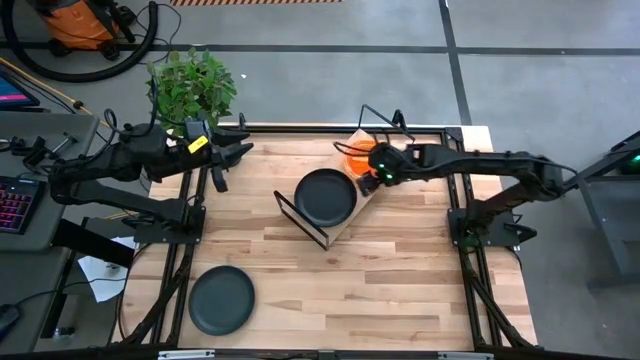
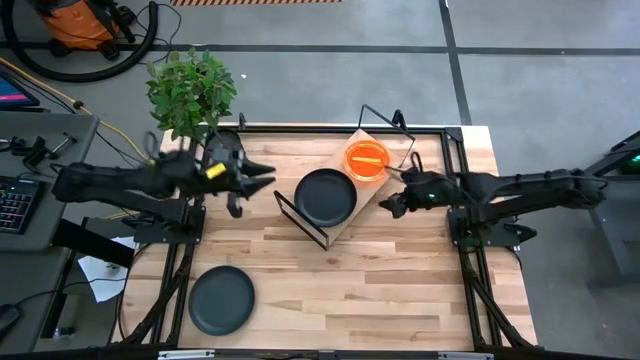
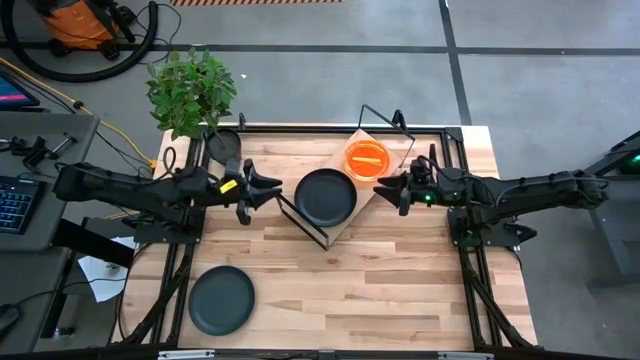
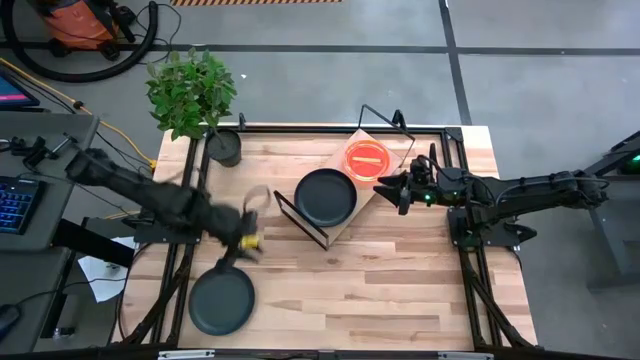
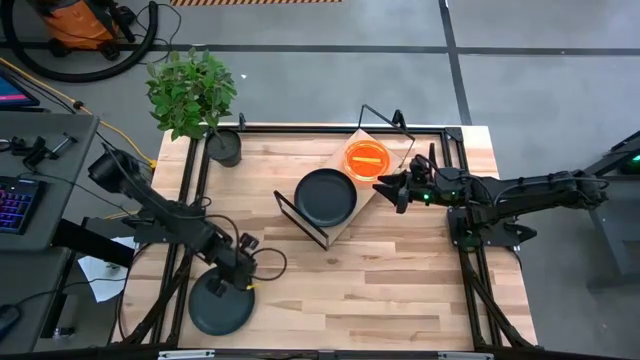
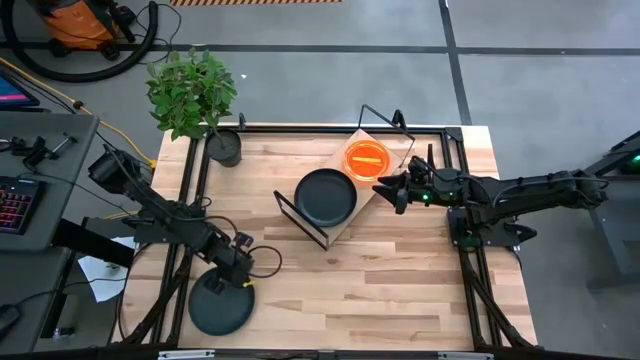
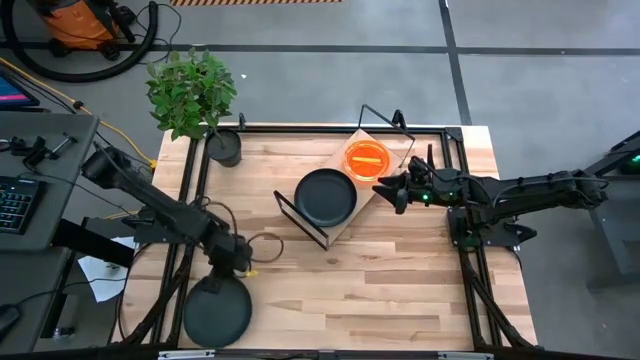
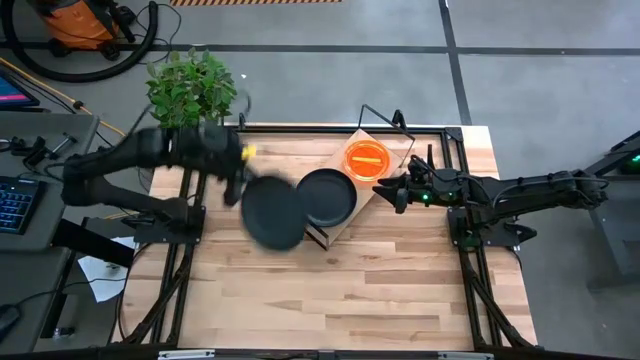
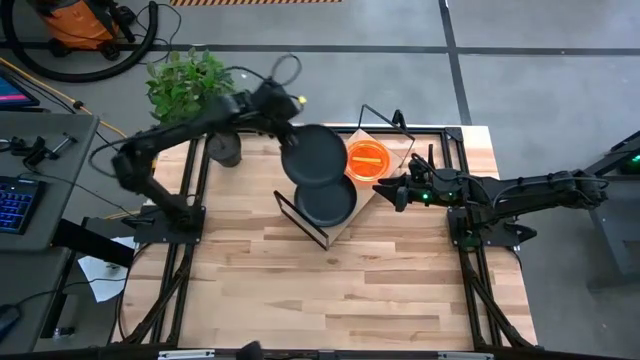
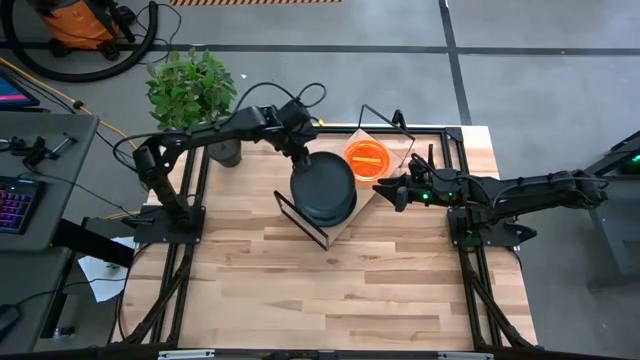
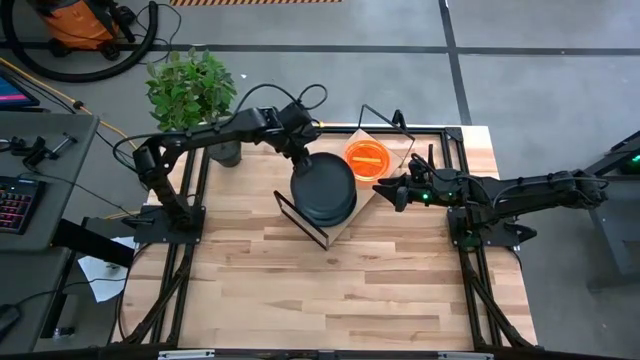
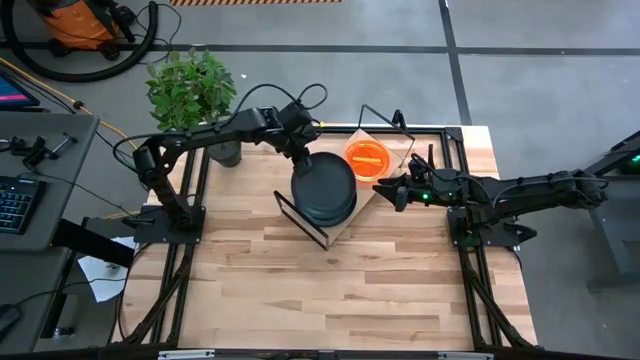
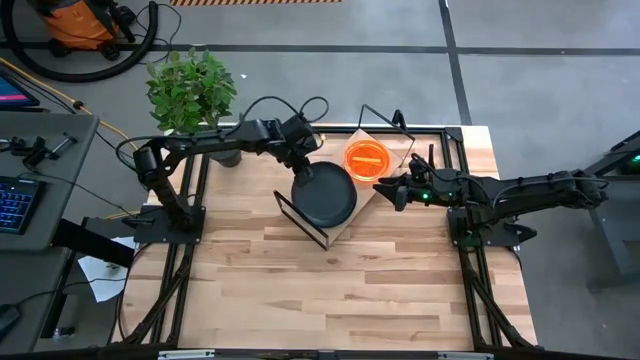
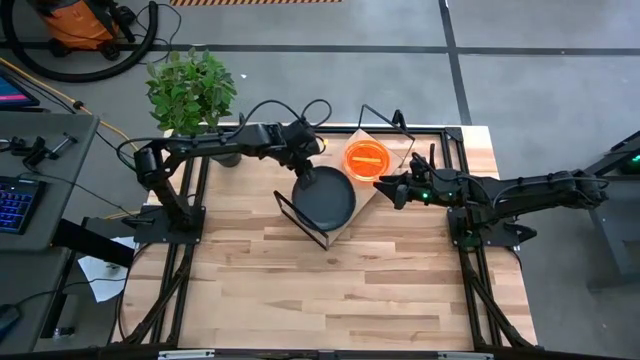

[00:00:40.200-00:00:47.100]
Task: Place and stack plates onto a shelf
Stack the black plate on top of the stacked black plates on the shelf

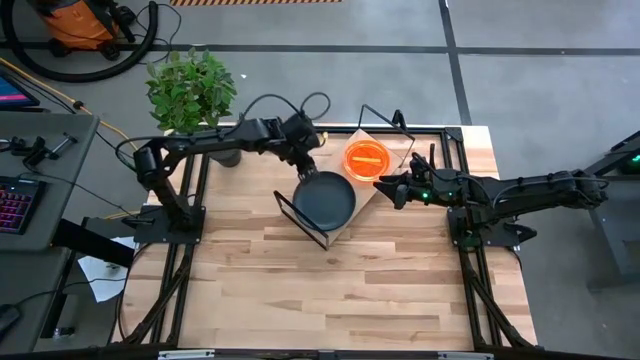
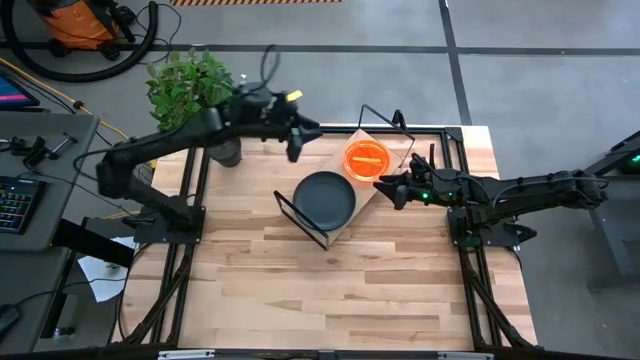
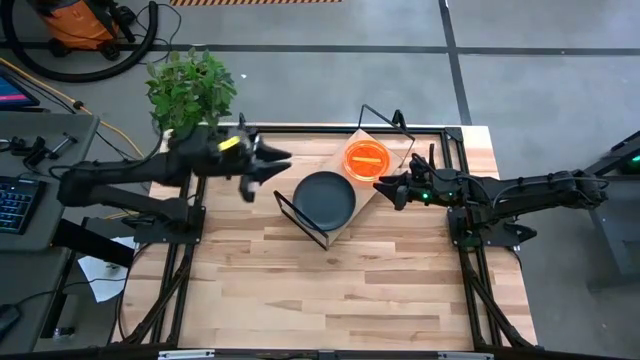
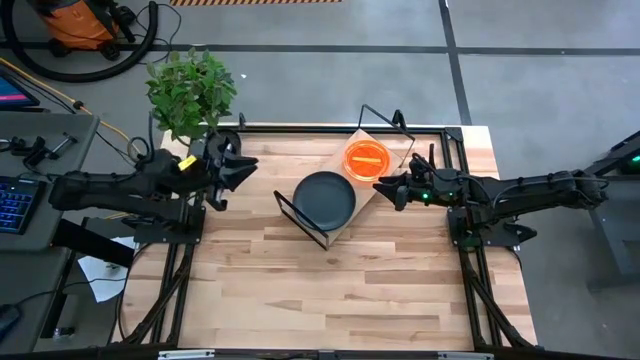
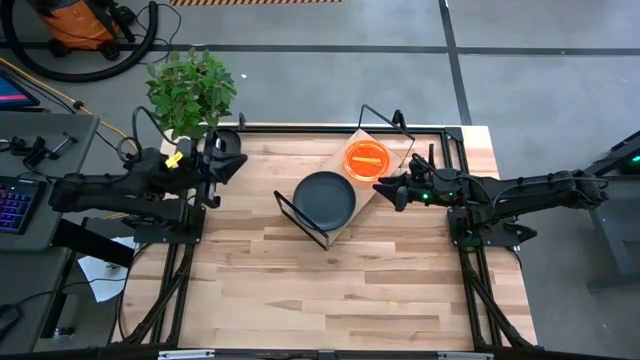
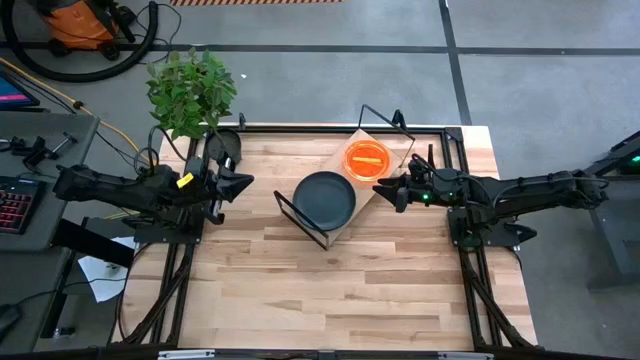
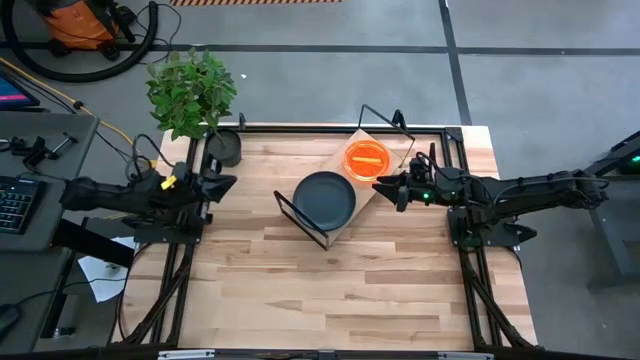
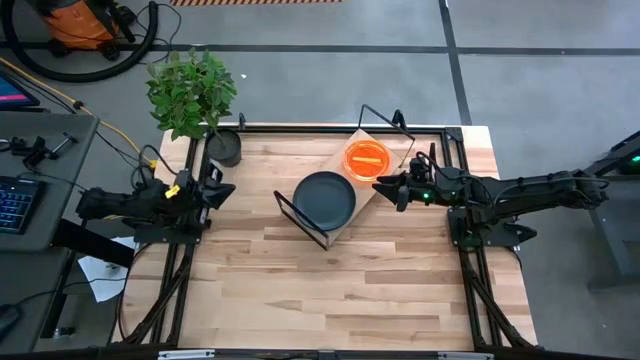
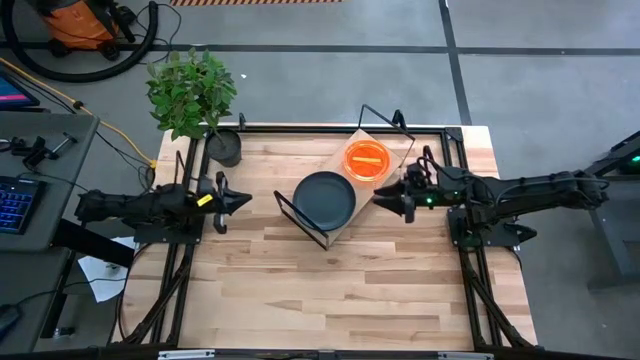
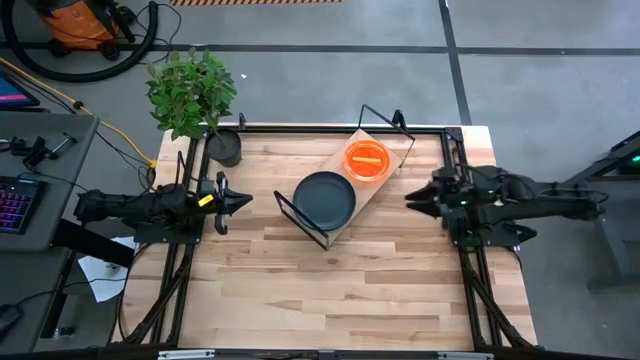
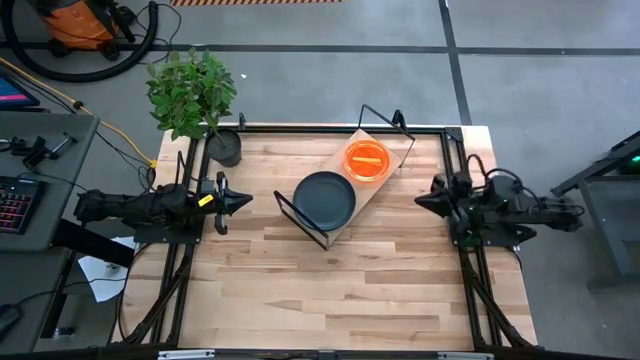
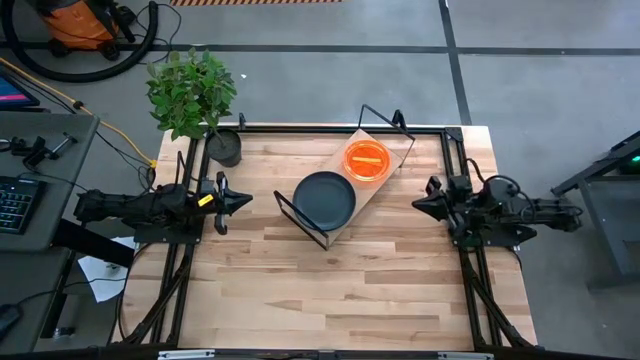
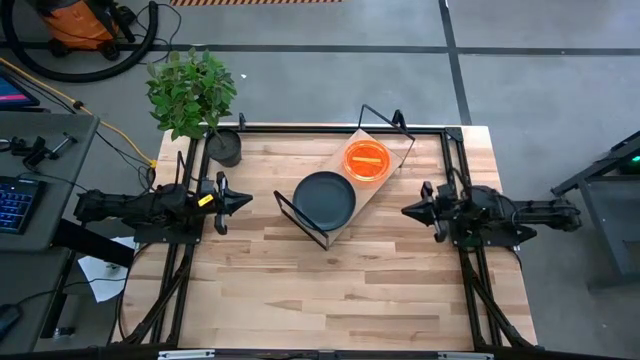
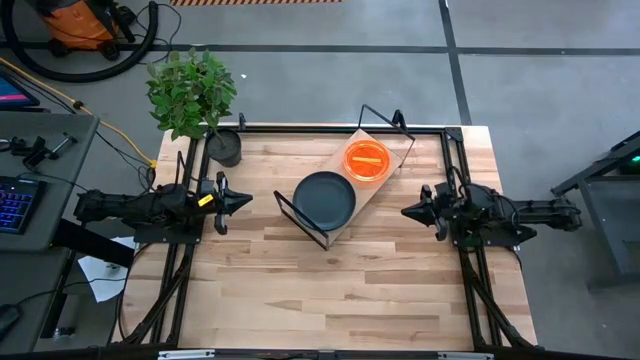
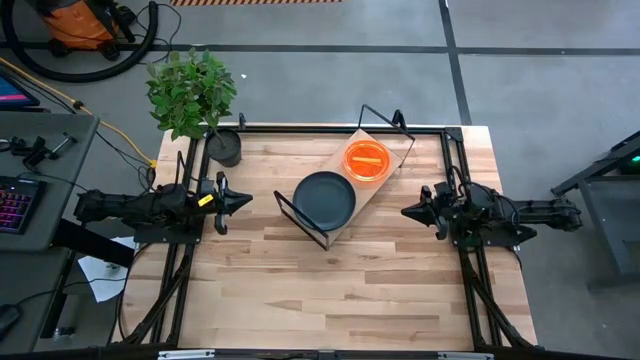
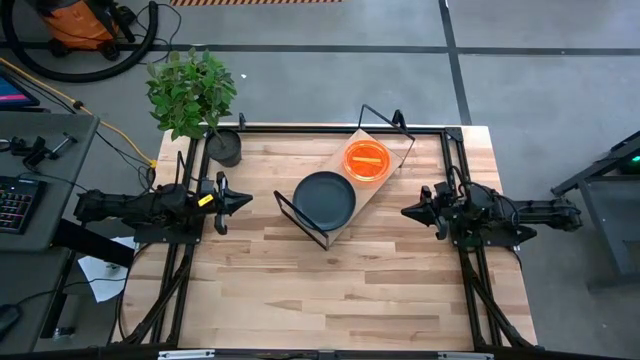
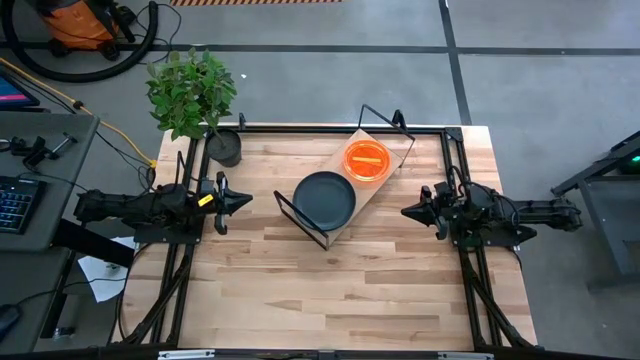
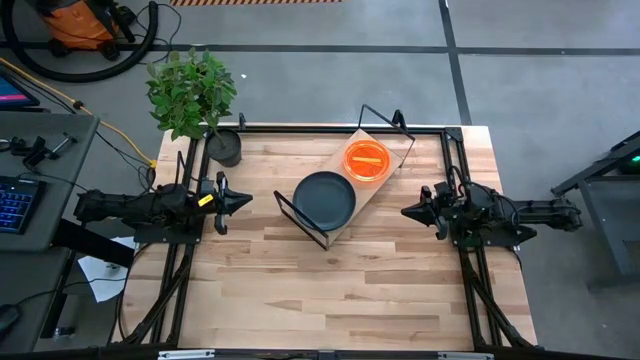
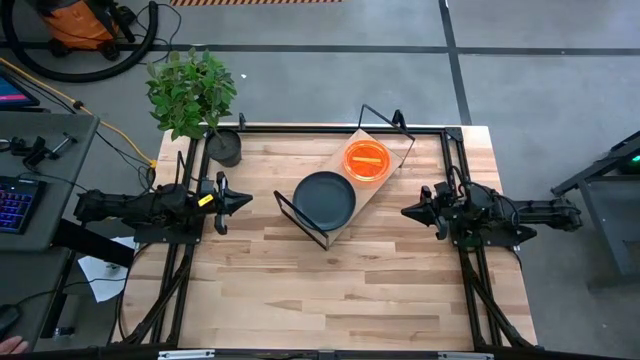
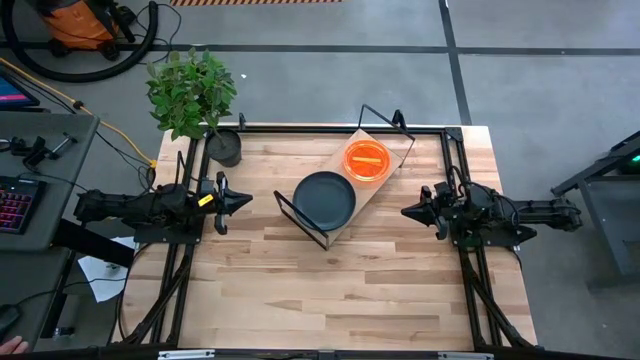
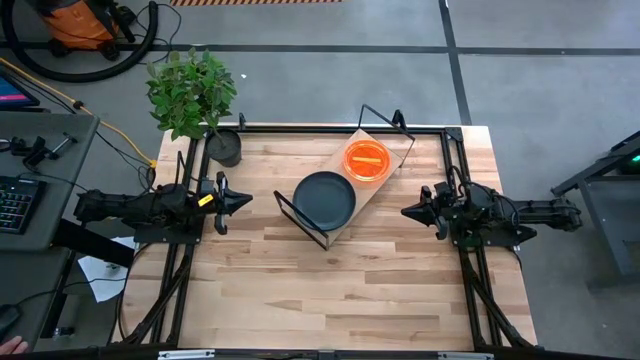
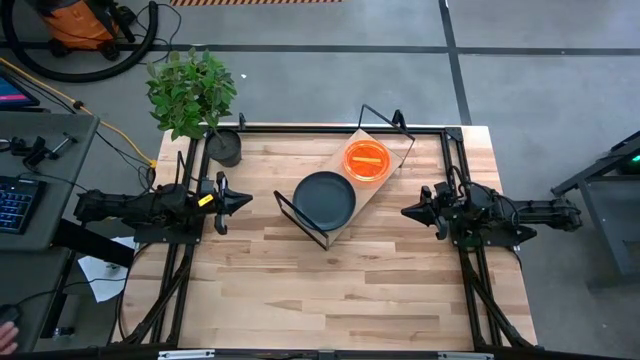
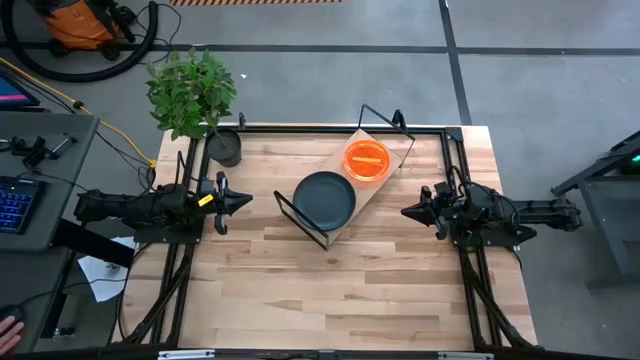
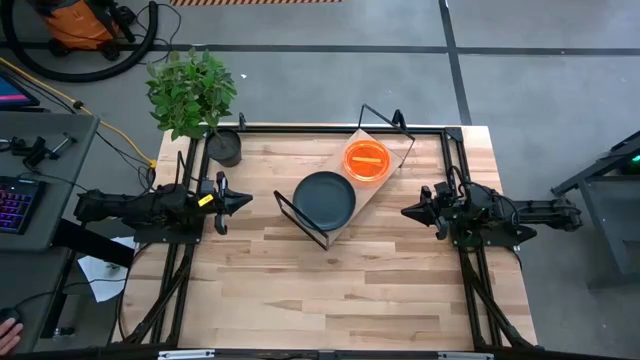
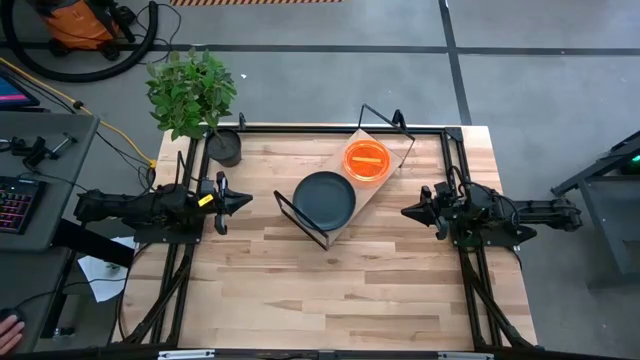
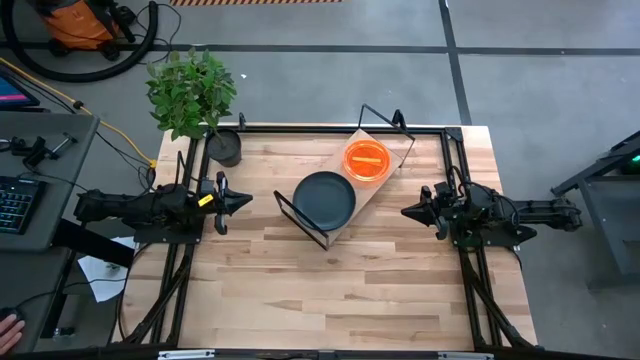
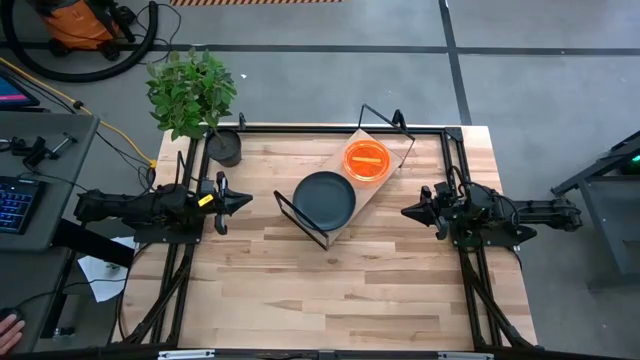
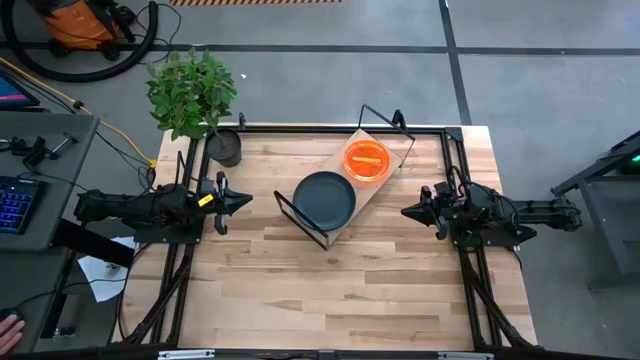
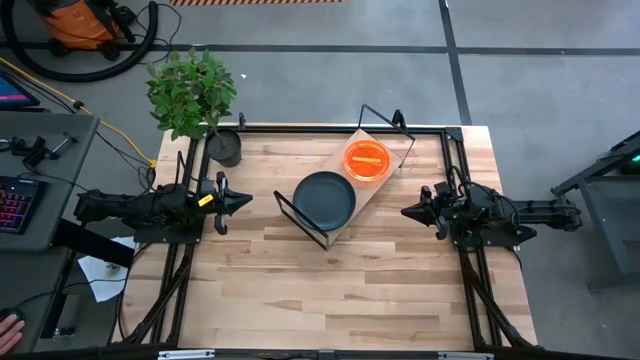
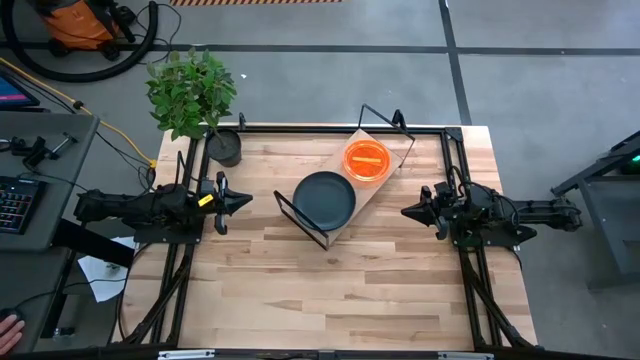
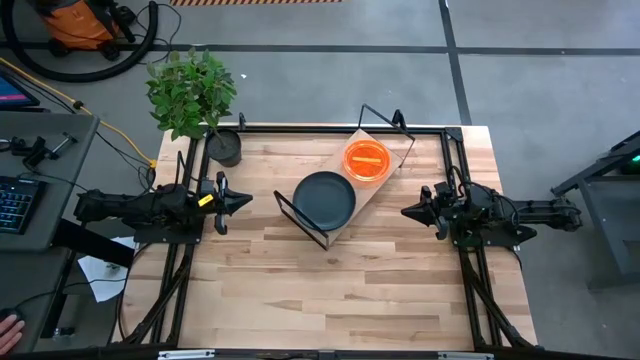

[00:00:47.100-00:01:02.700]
Return to Home Position
